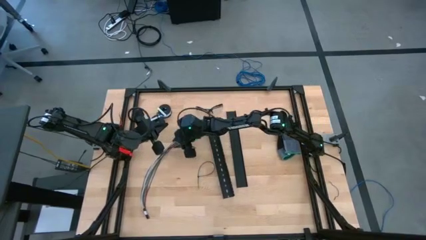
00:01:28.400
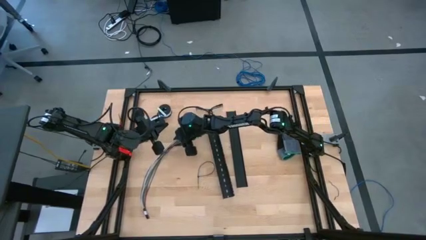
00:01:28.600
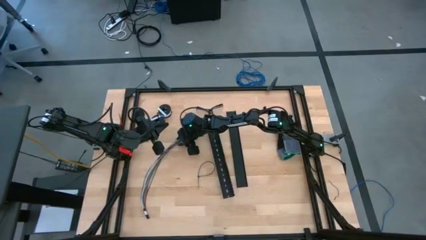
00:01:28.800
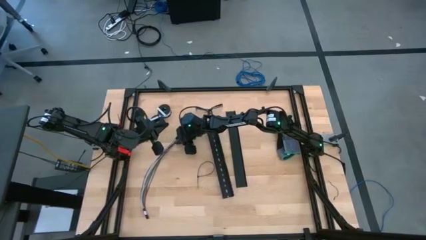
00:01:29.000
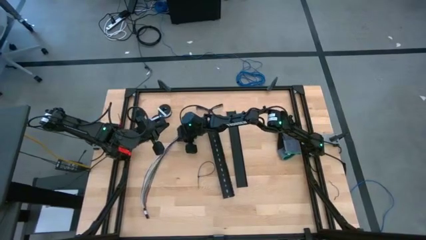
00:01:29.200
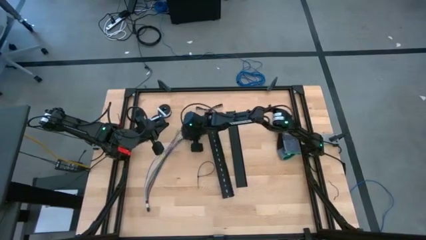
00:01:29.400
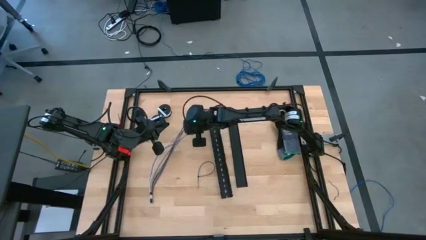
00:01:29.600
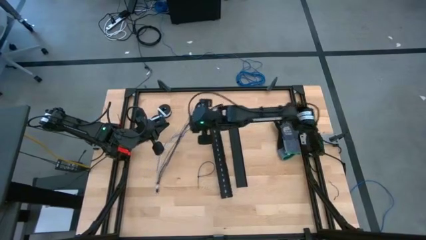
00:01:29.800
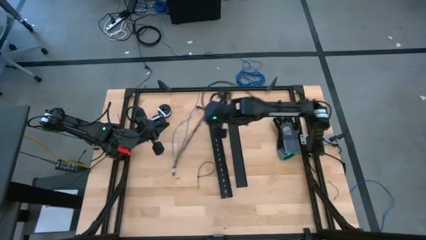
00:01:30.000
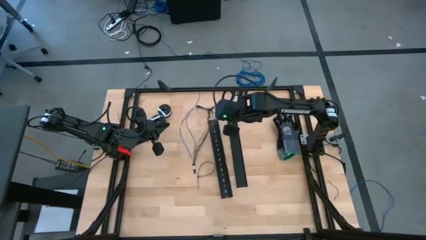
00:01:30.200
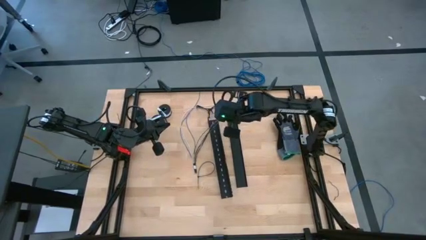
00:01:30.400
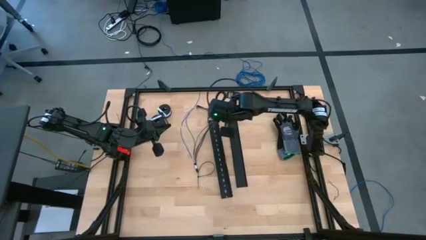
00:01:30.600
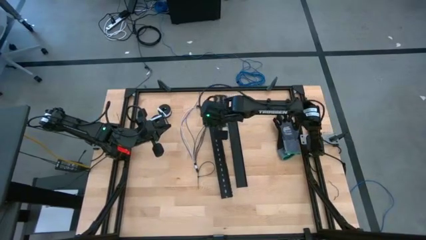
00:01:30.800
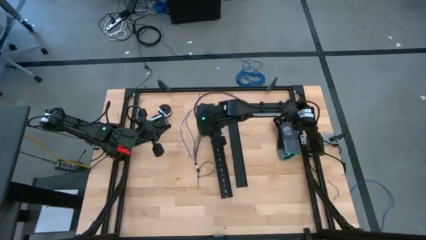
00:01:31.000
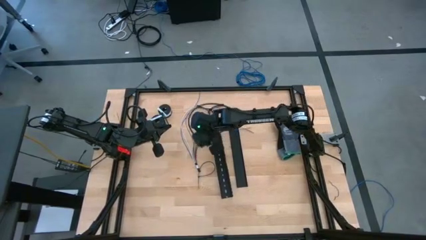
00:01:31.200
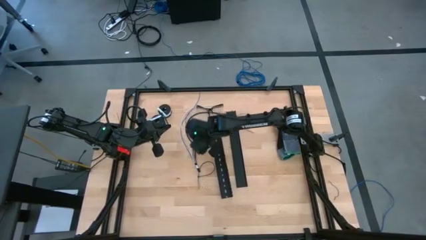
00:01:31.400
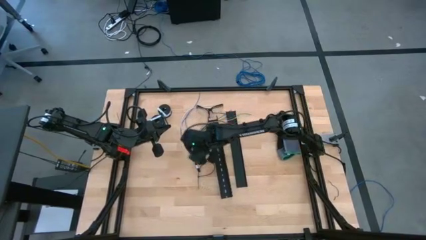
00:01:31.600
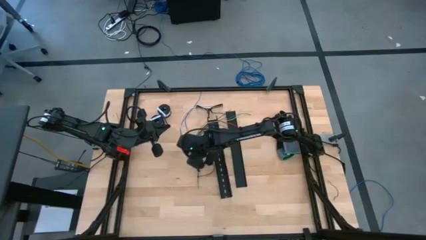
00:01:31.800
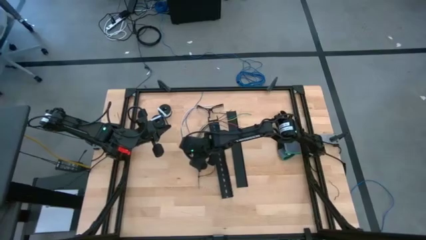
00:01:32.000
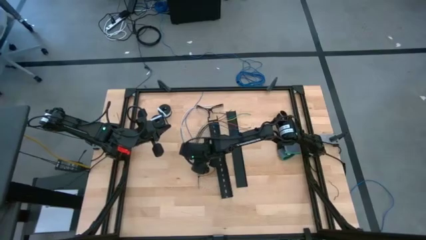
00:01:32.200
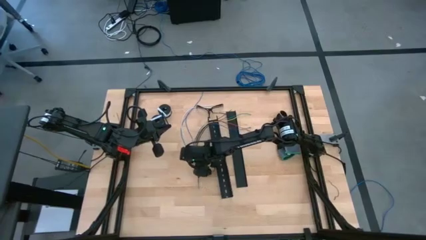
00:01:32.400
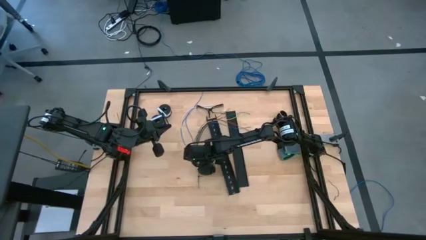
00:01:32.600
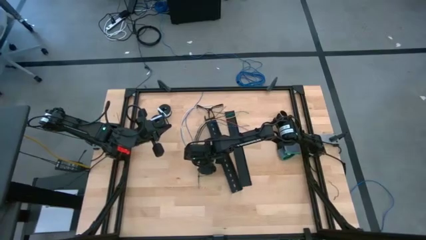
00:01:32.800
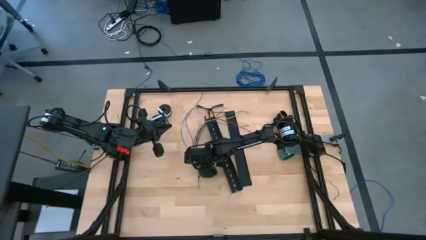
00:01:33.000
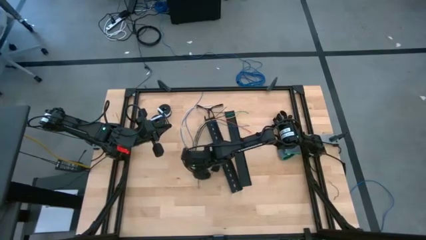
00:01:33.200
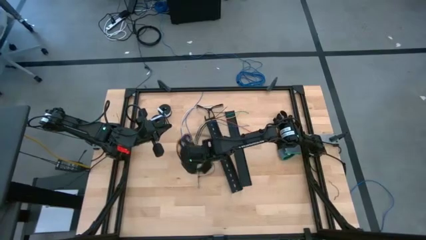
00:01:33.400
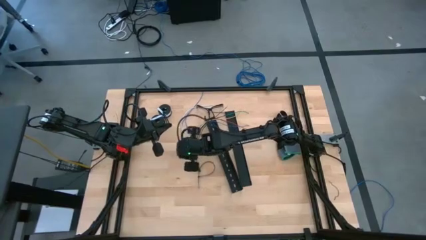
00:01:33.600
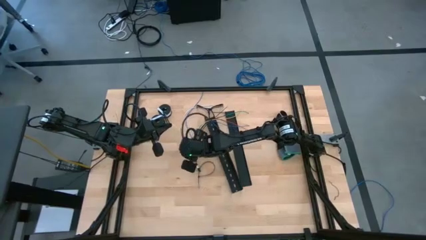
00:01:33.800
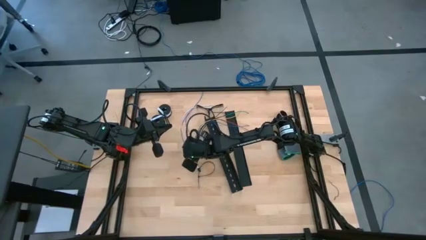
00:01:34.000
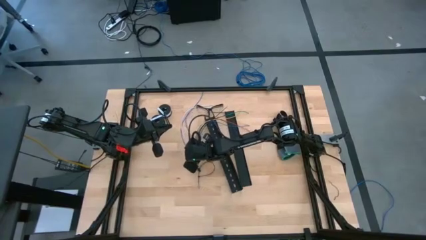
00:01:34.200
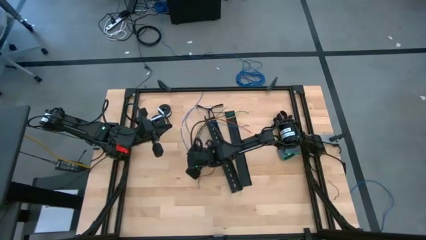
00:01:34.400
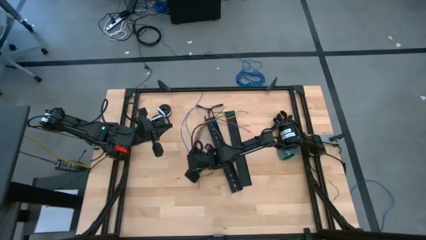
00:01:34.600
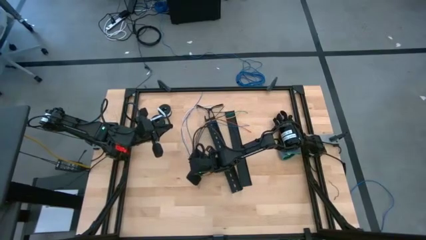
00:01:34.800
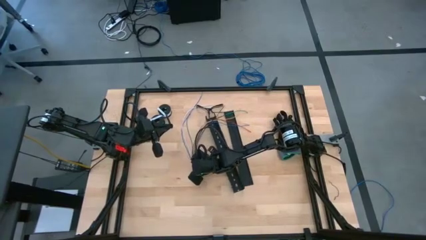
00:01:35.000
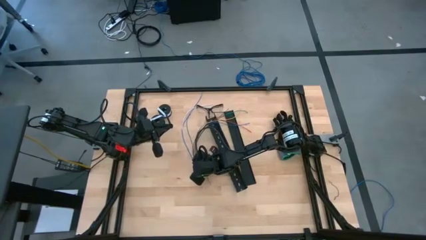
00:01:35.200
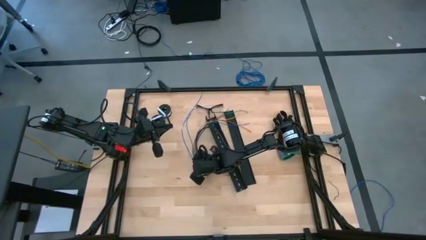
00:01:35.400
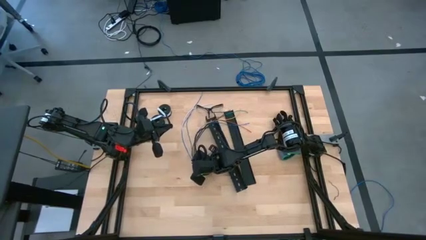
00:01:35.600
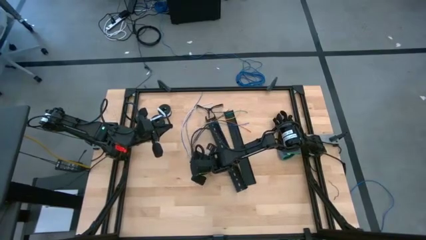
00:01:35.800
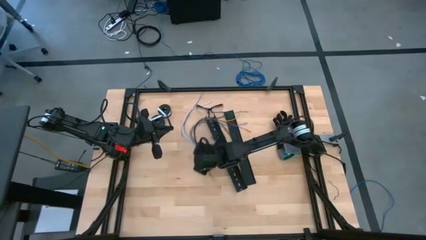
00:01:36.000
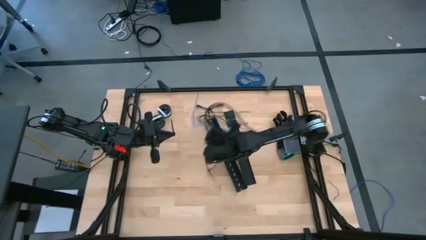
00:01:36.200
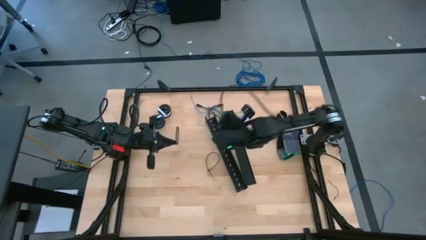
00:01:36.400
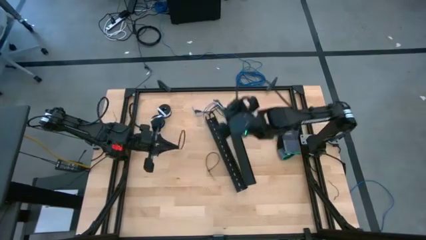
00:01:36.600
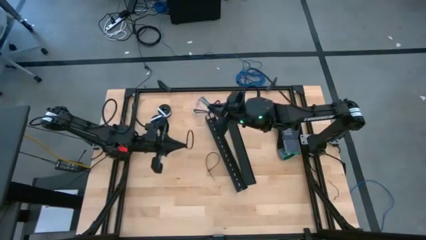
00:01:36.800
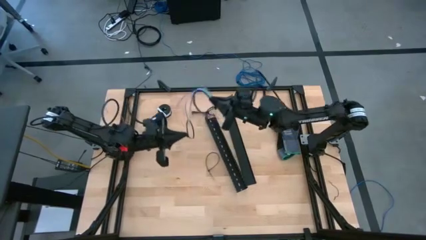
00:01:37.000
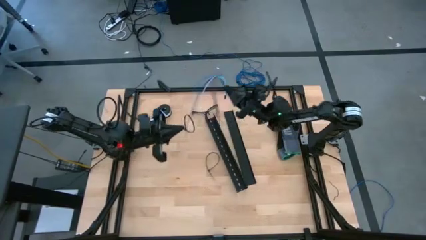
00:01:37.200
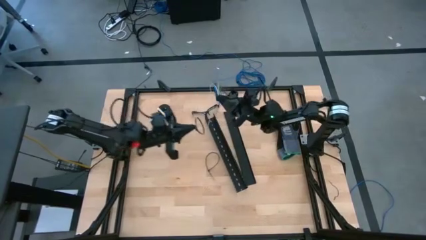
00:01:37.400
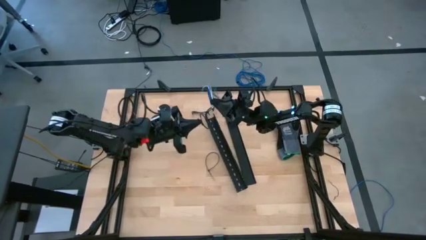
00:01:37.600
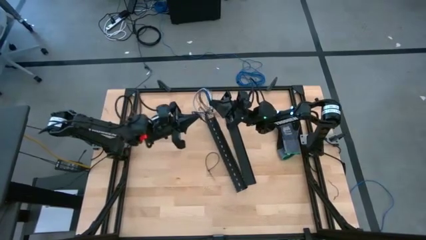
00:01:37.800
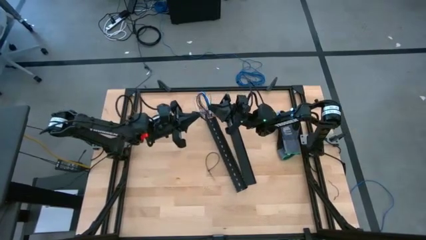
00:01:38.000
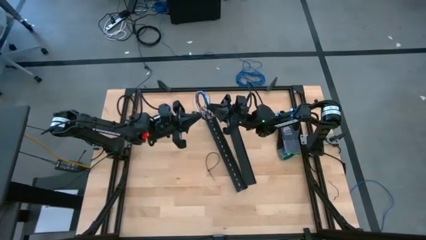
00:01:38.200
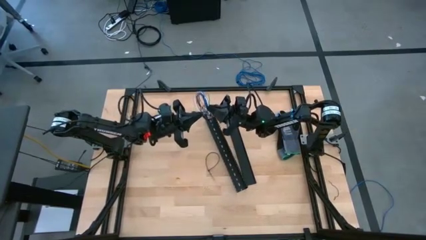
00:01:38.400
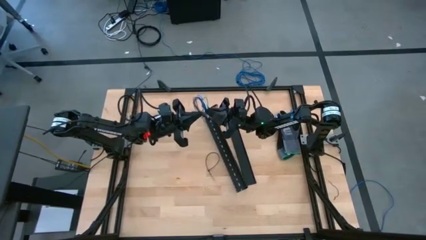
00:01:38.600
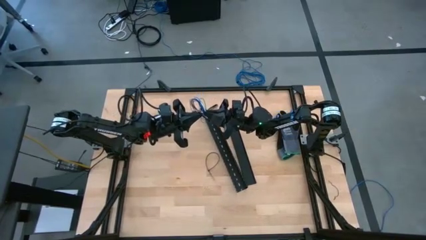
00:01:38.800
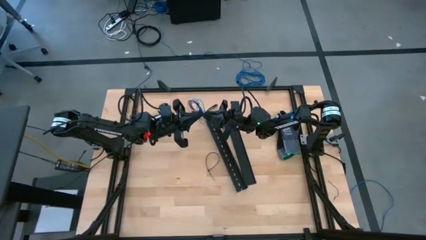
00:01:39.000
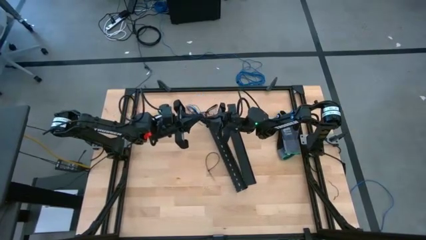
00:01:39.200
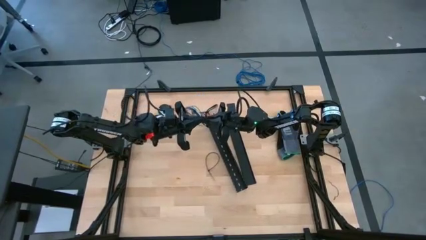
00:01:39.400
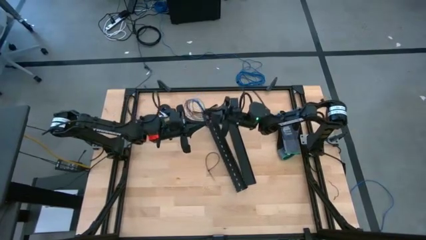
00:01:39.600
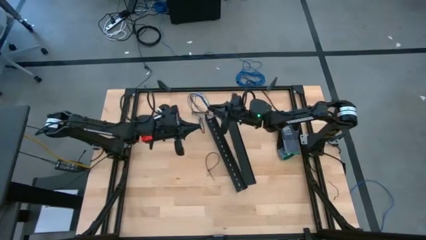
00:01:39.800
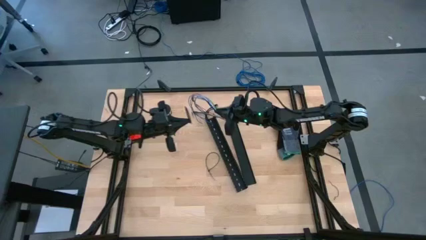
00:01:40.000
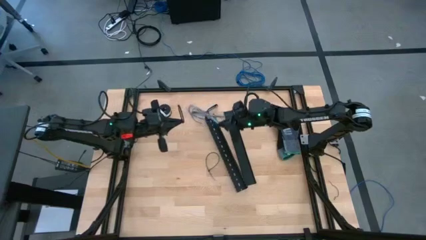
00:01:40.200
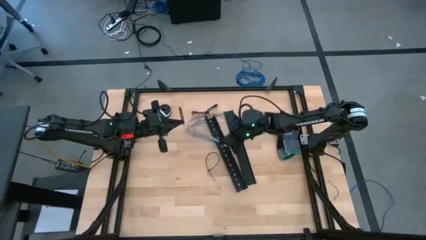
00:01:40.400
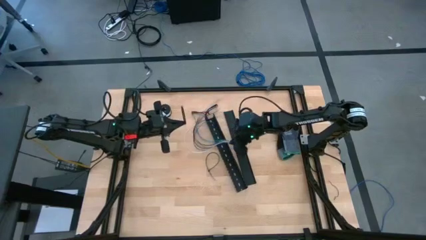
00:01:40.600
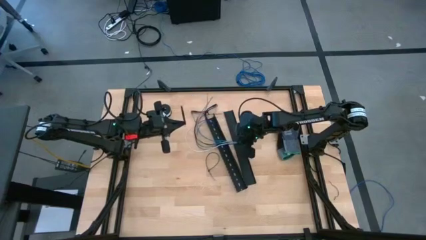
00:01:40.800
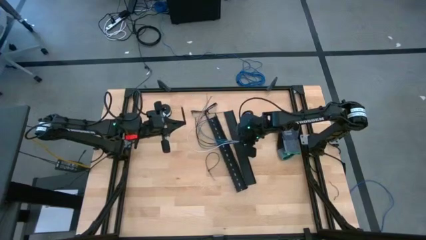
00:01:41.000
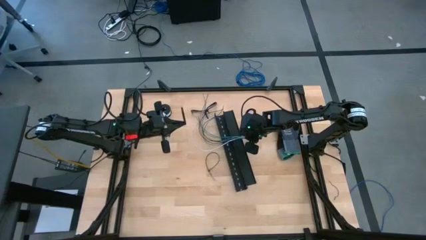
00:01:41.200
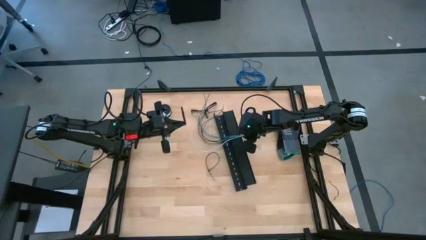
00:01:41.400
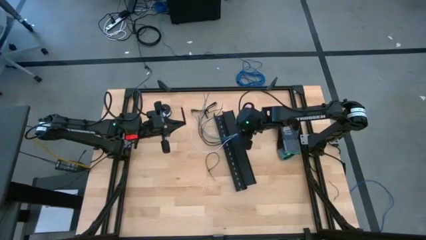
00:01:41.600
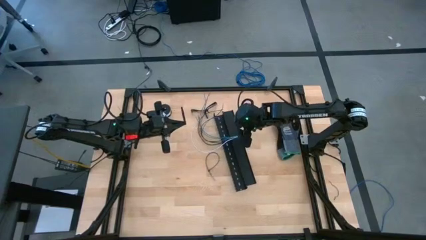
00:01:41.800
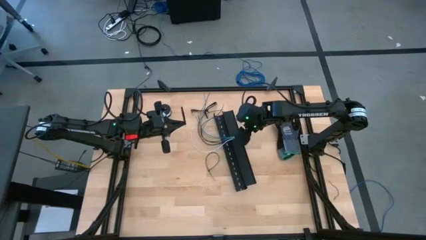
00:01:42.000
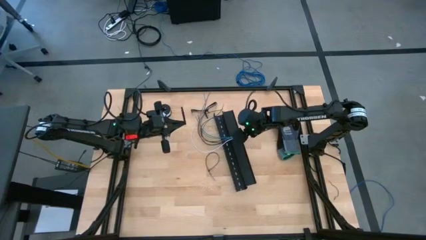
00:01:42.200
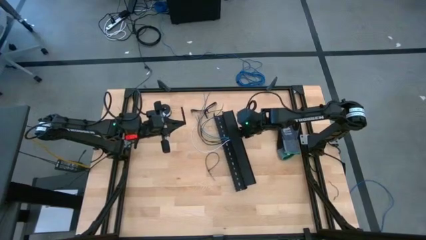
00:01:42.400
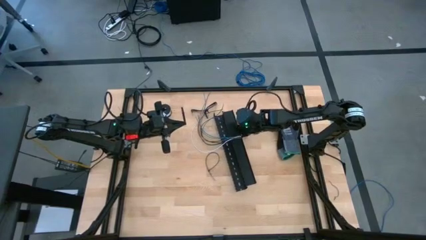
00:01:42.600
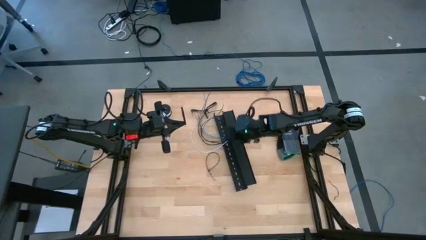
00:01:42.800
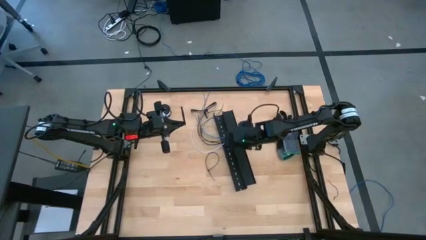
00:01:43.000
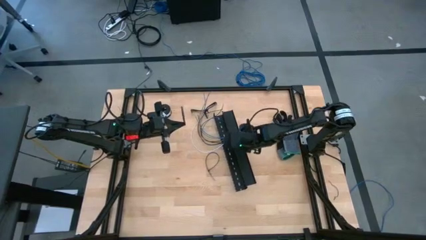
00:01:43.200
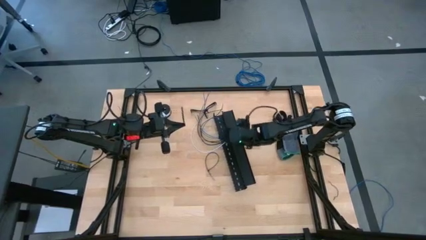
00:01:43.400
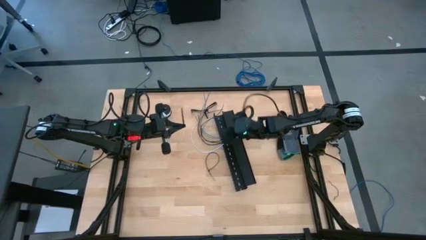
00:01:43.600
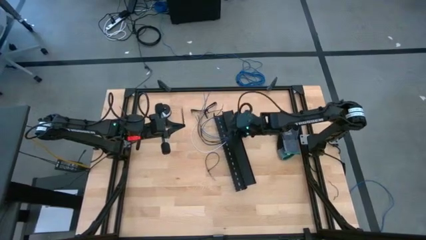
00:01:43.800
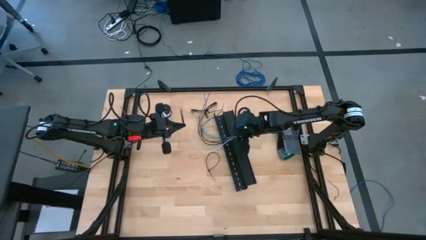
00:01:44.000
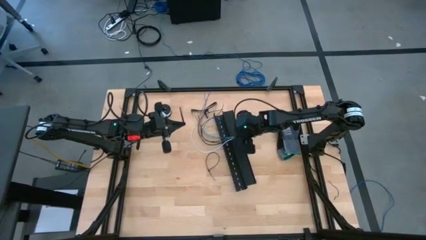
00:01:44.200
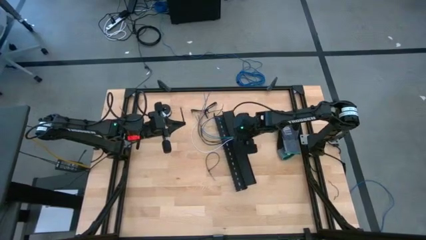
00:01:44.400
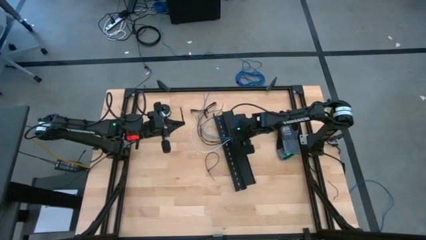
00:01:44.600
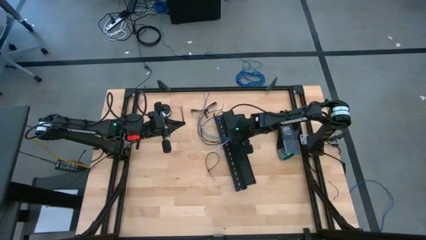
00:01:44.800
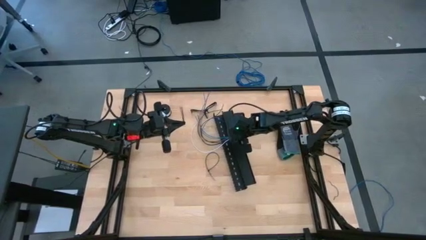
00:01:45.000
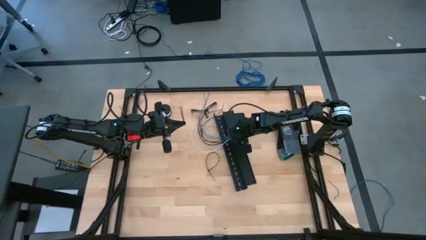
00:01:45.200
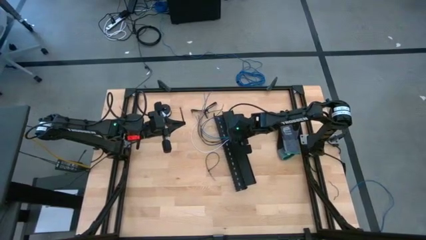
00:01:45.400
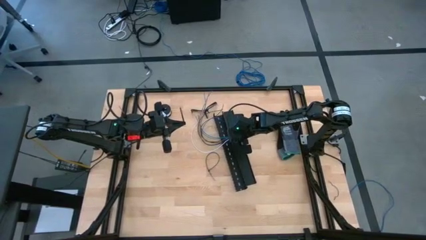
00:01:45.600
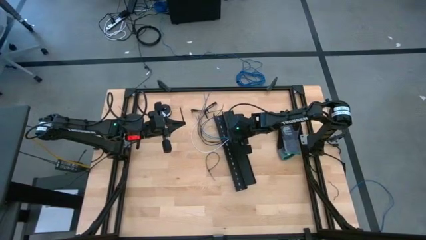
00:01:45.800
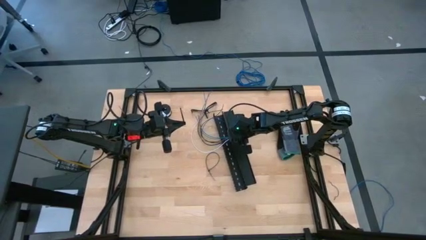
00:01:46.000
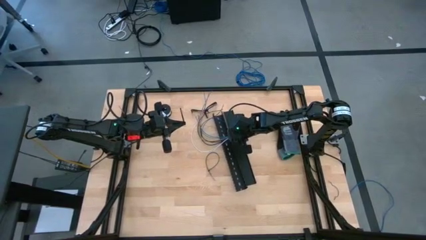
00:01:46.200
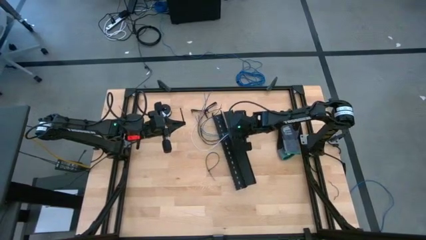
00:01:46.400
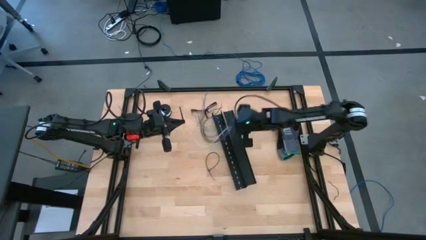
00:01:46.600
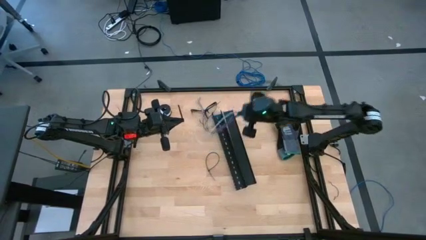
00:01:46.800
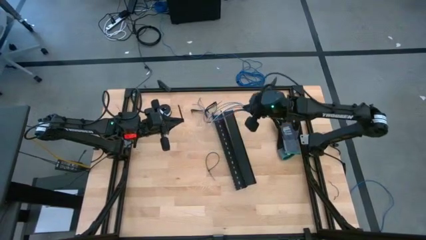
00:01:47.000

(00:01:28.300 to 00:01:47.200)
Task: Ziptie cables
Wrap the black zip tie on the cable
